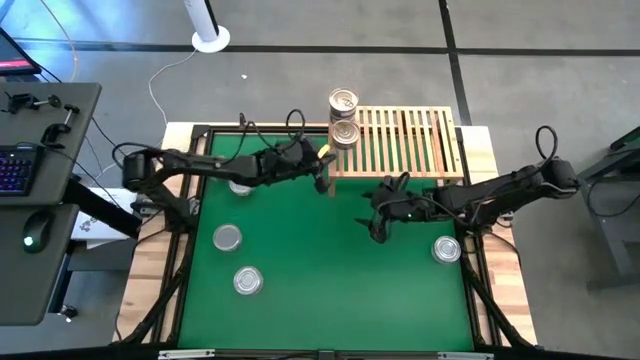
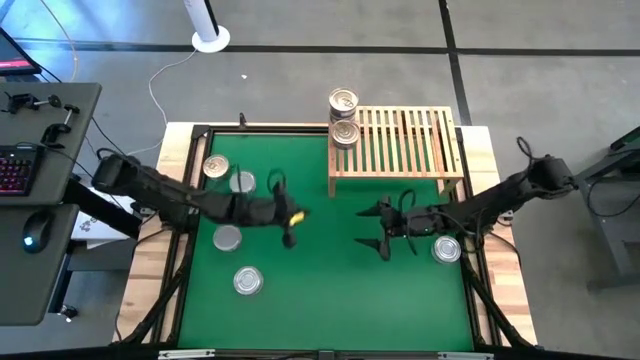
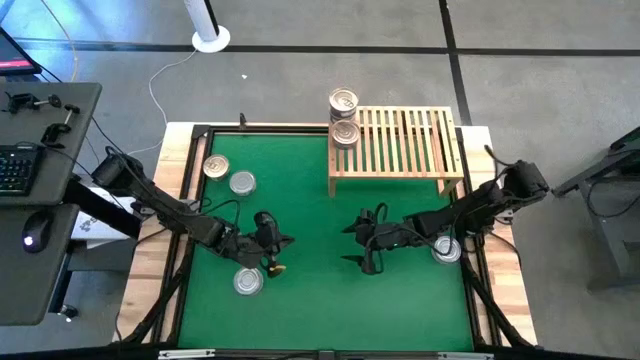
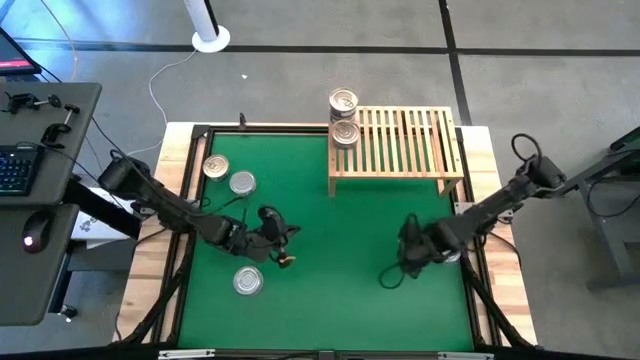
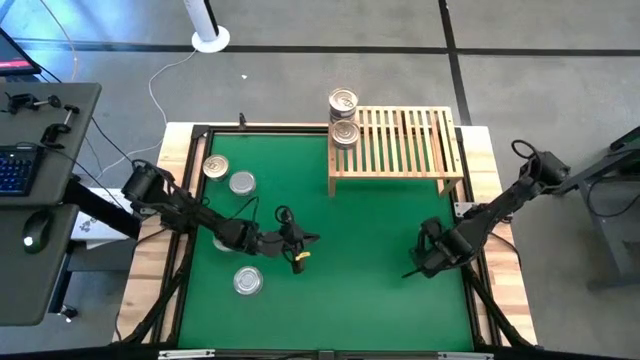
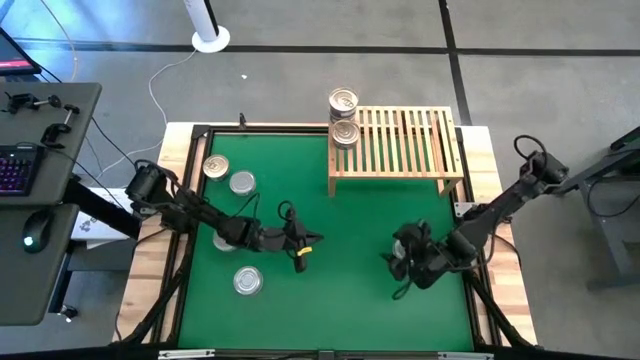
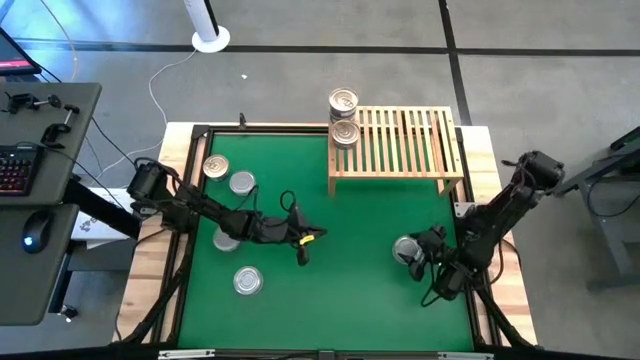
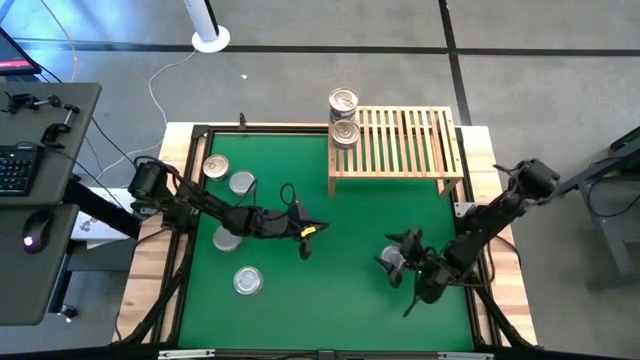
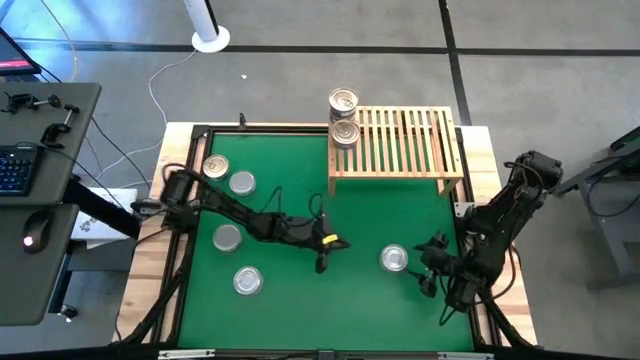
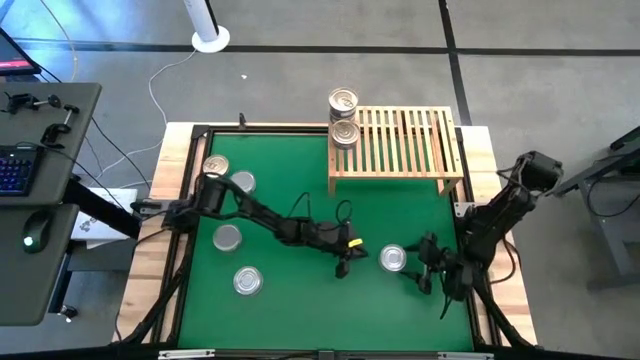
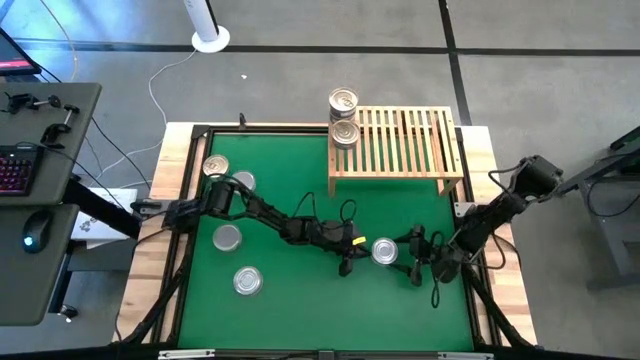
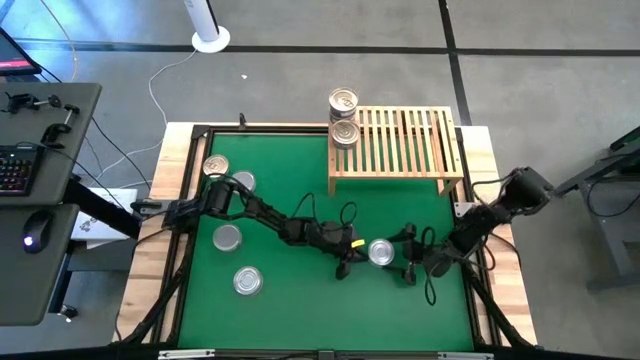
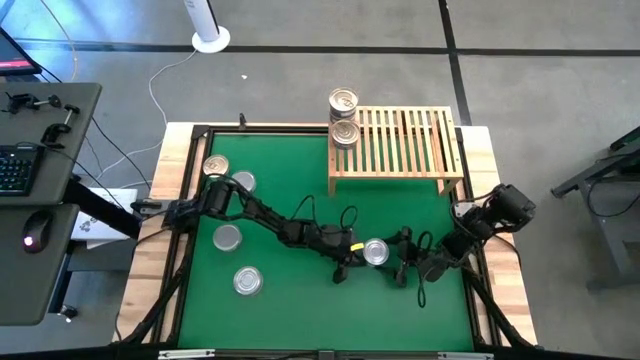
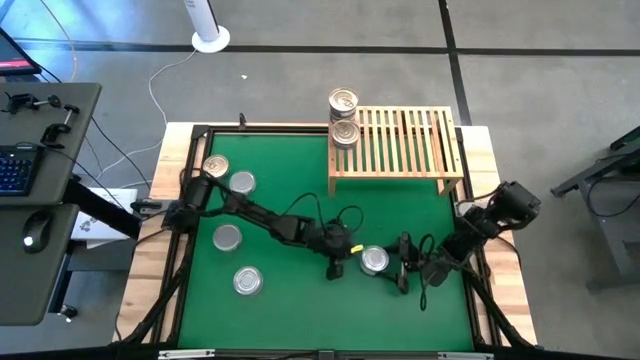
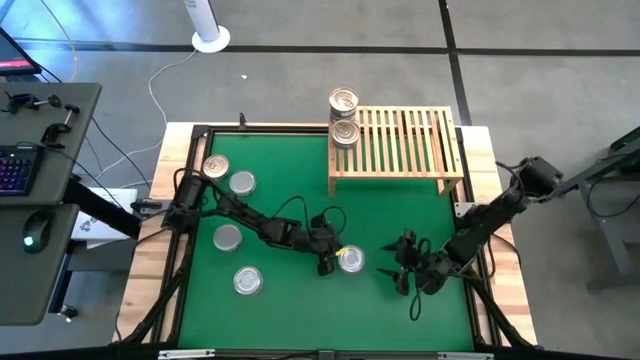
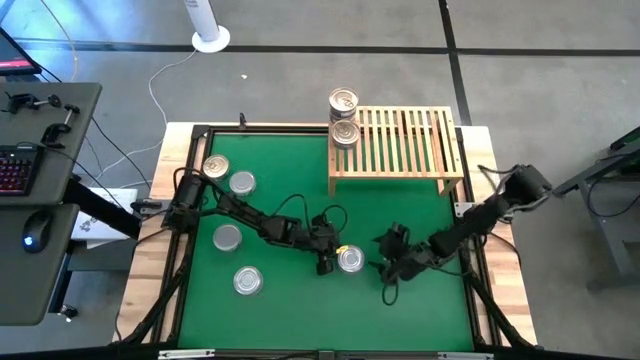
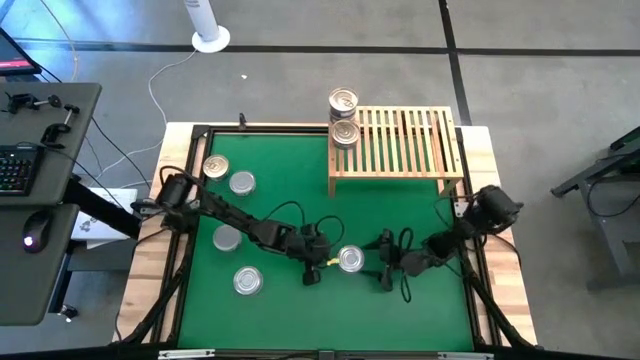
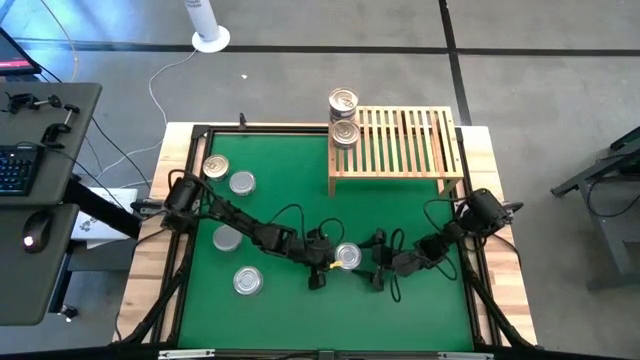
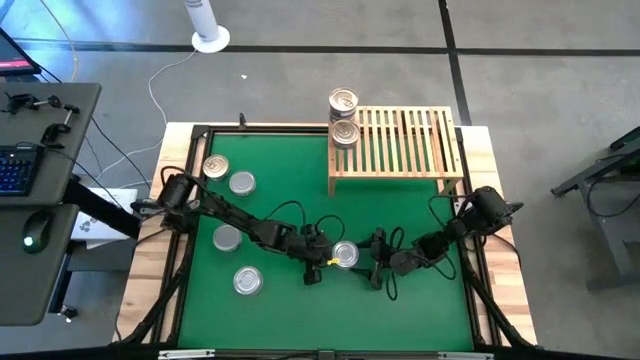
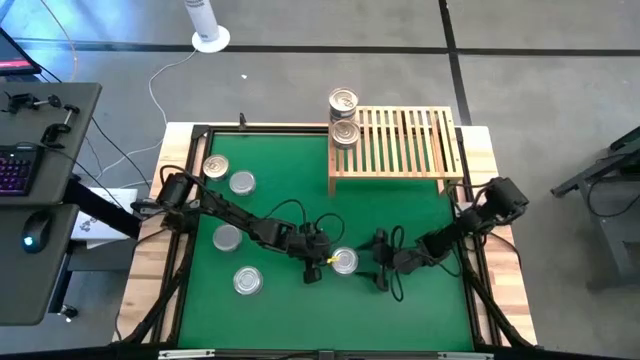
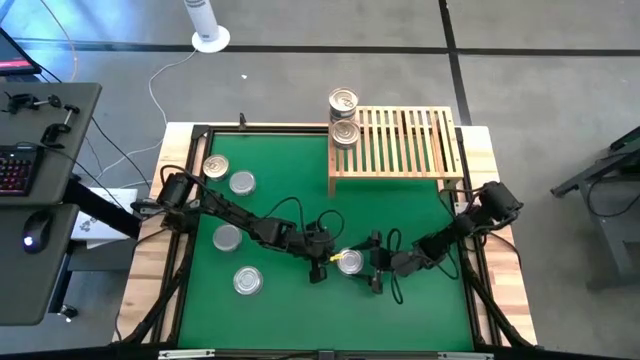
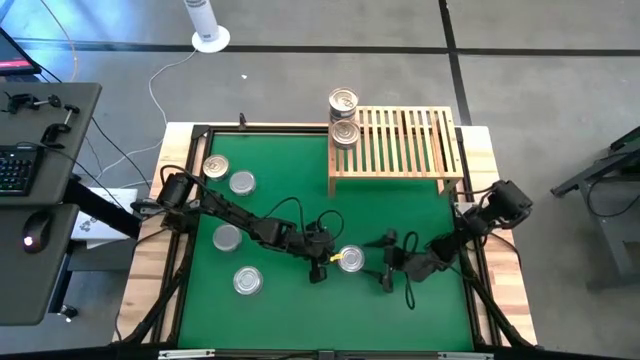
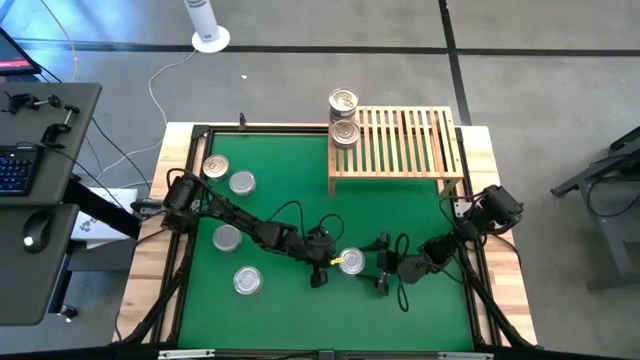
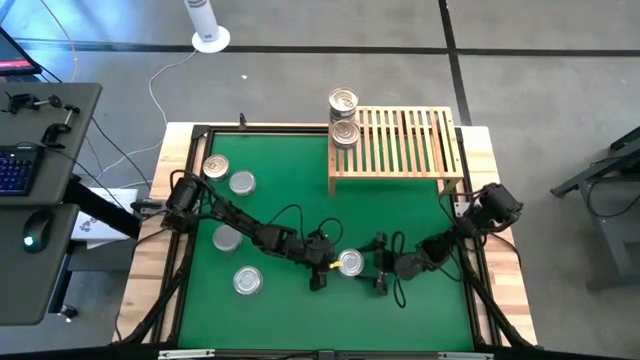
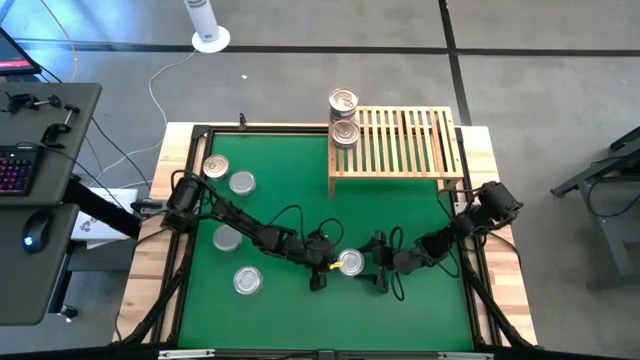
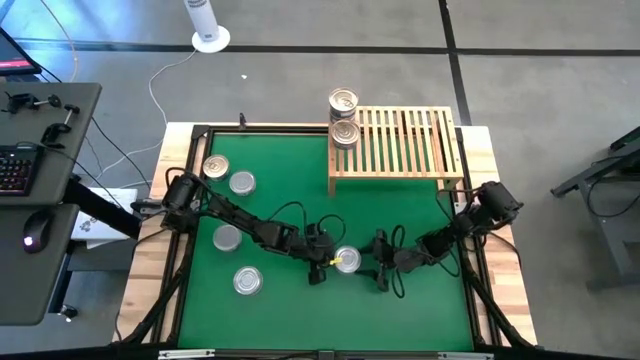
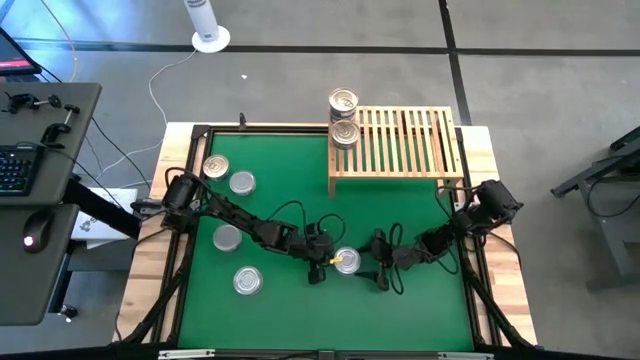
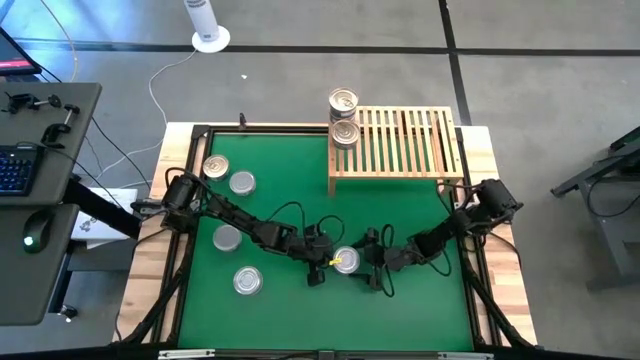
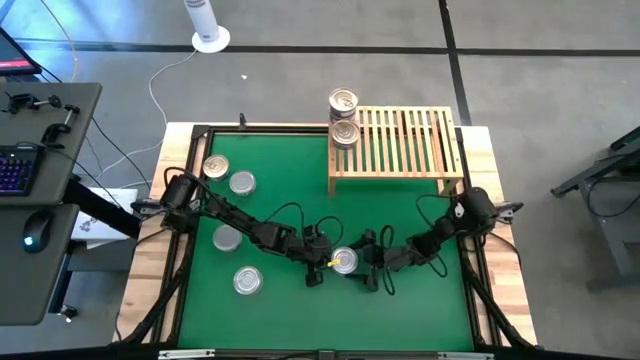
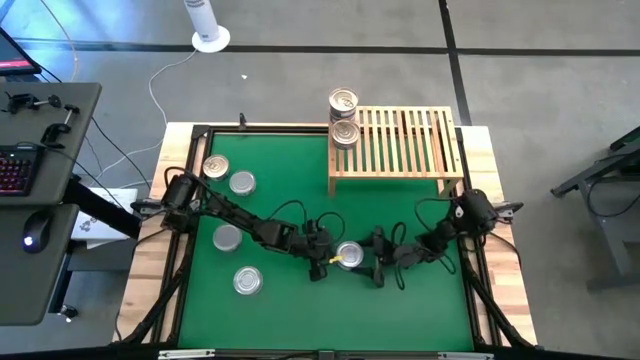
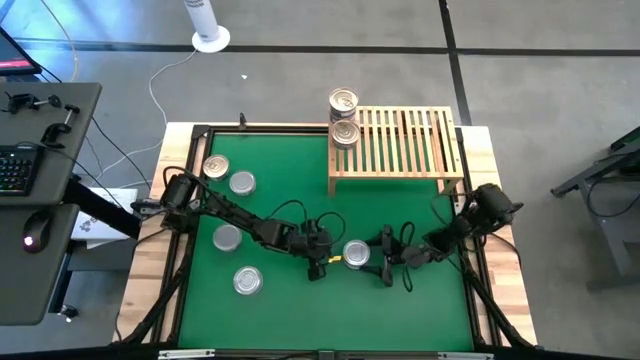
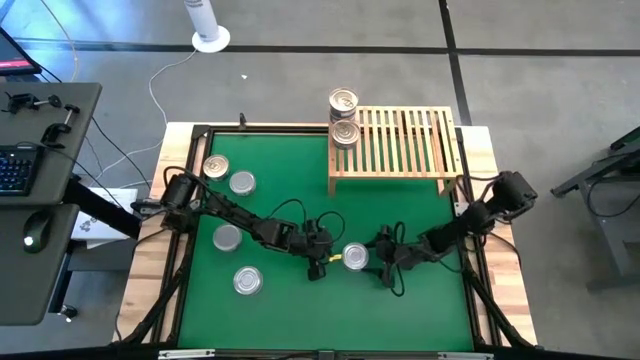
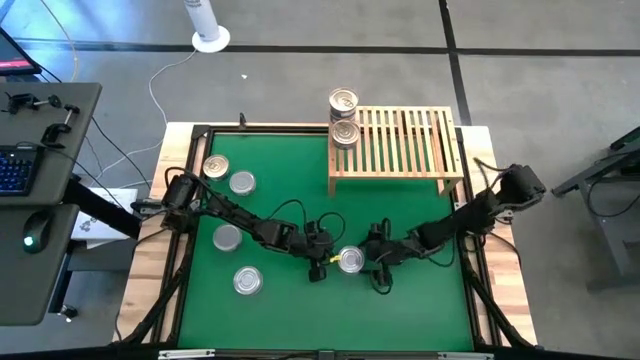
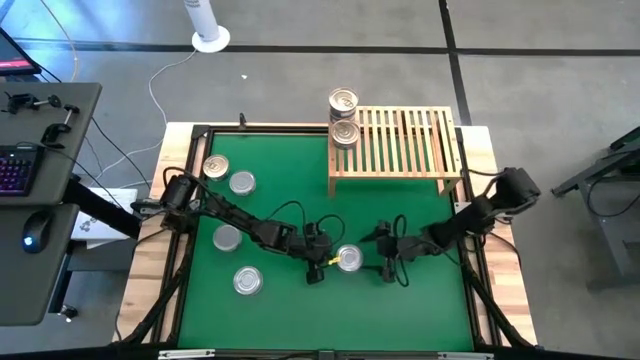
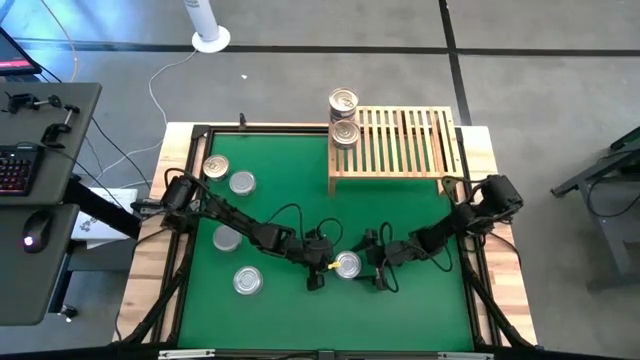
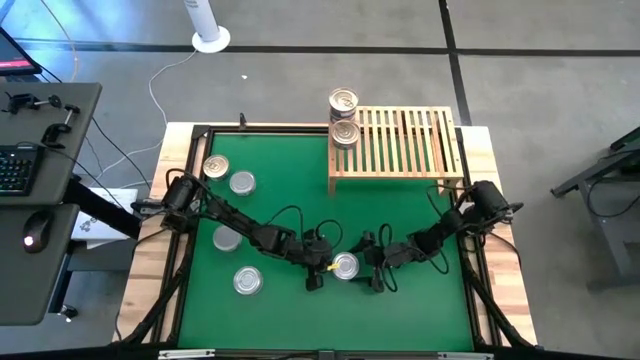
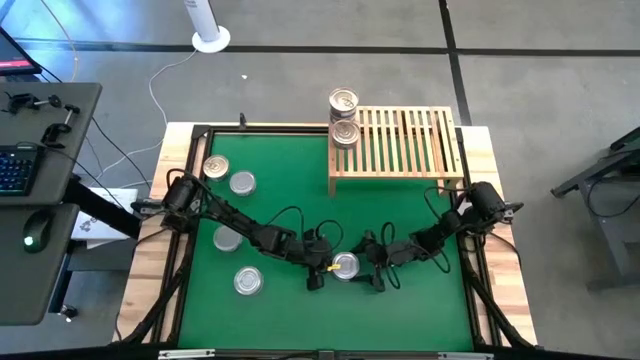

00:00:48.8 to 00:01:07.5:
Task: Stack canned seafood by type on shelf
Put the green tuna can on the shelf

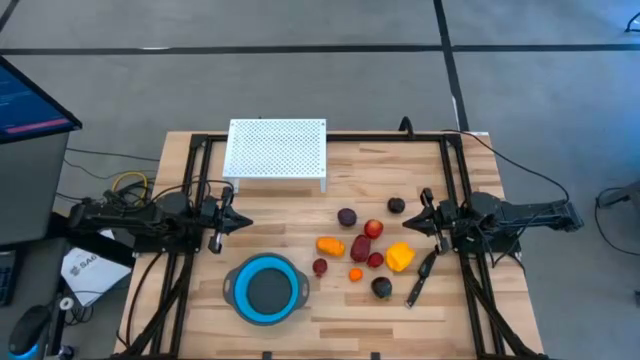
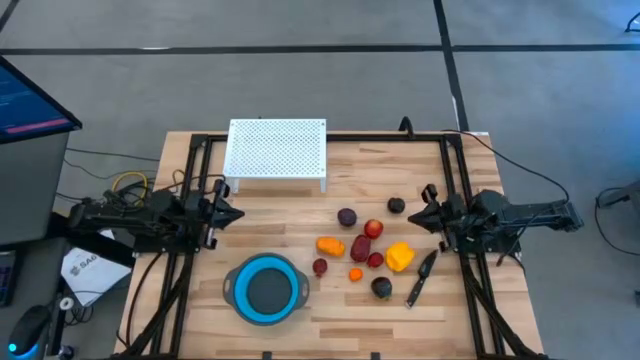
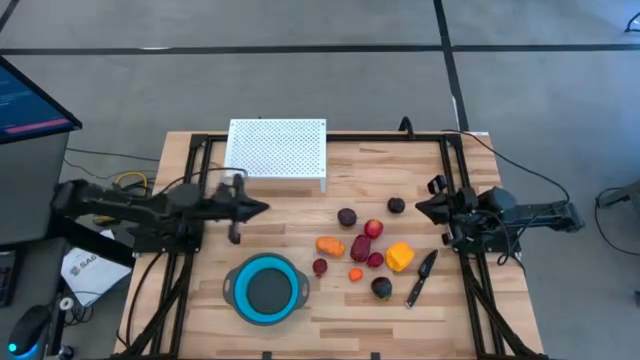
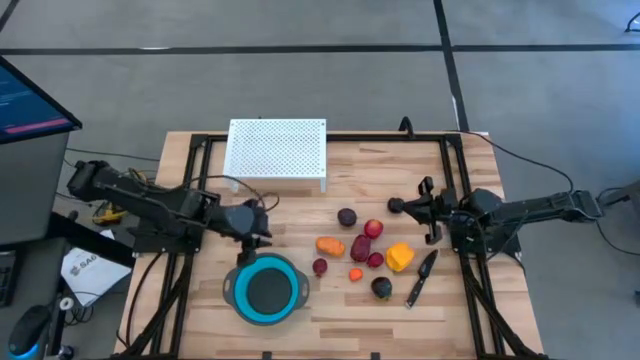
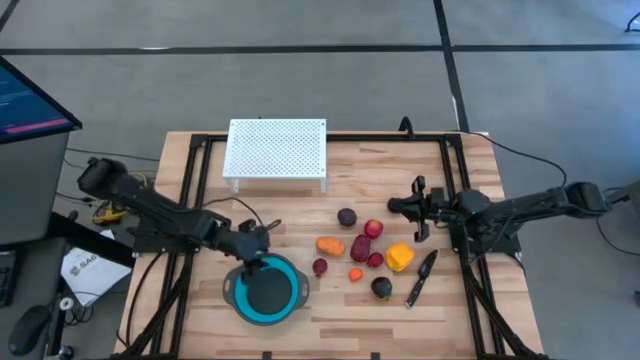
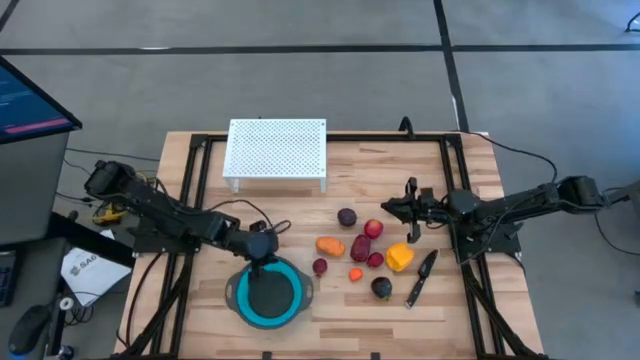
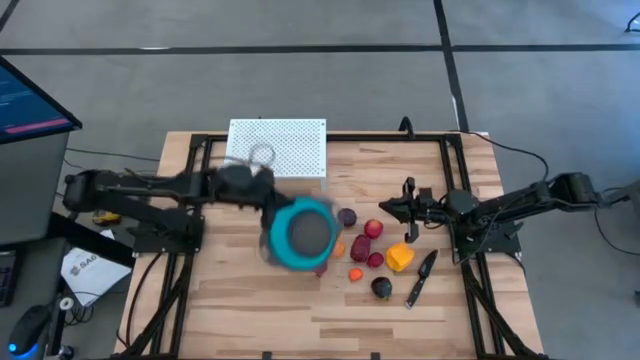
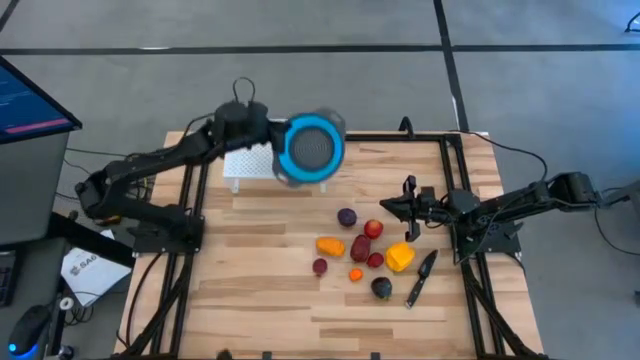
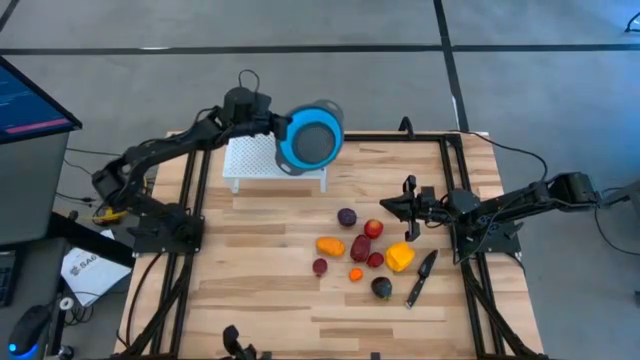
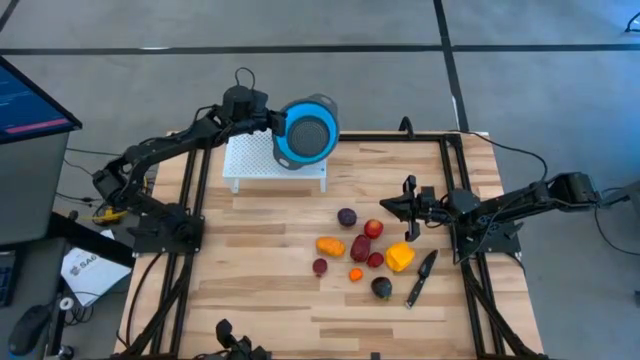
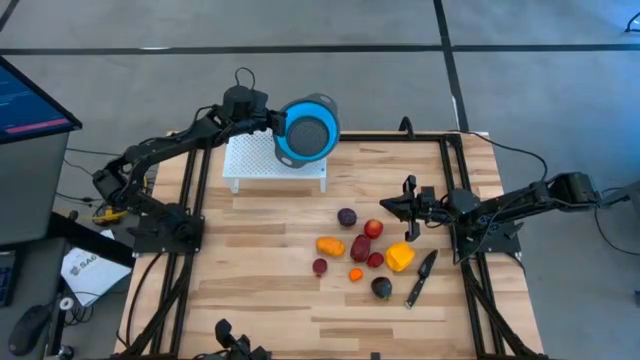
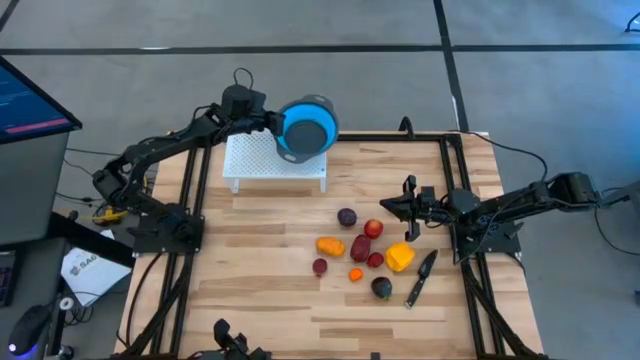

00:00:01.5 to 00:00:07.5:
Task: Pick & Place Fruit
Put the blue strainer bowl on the shelf
